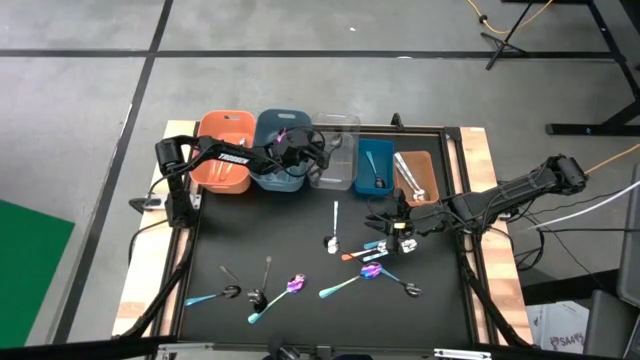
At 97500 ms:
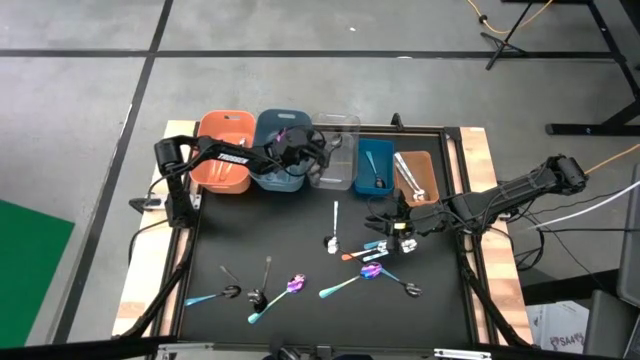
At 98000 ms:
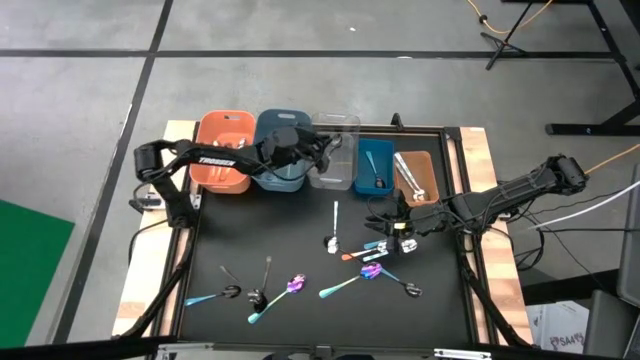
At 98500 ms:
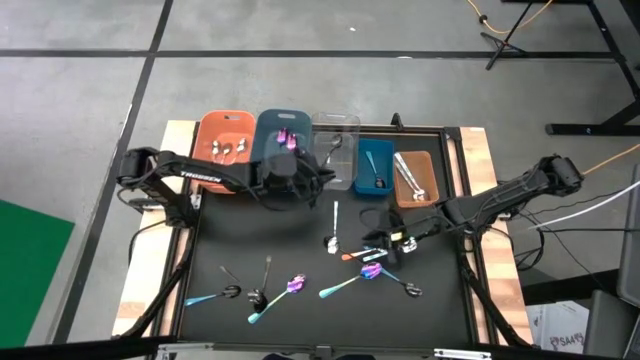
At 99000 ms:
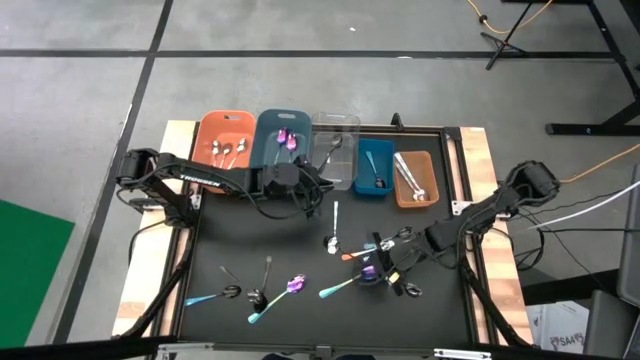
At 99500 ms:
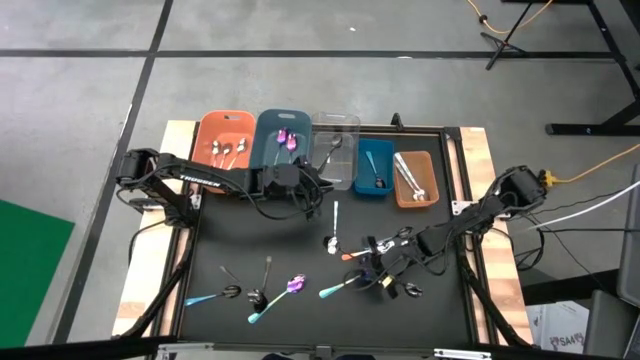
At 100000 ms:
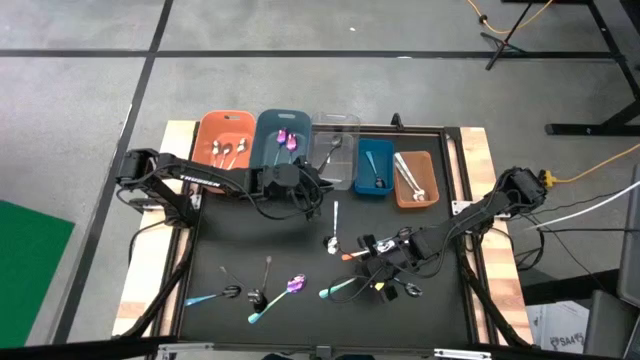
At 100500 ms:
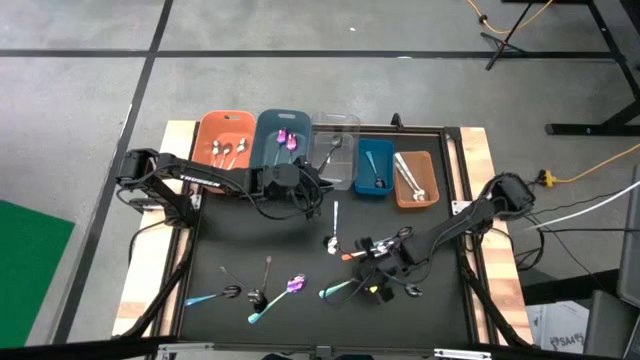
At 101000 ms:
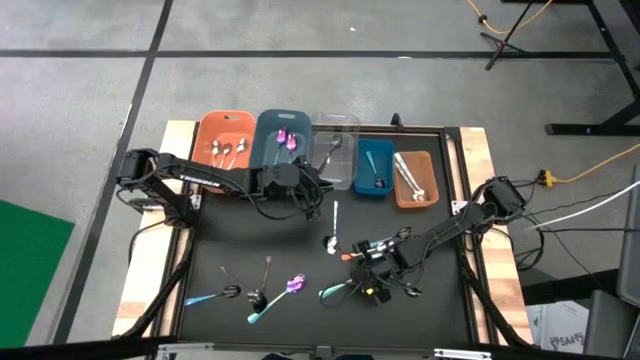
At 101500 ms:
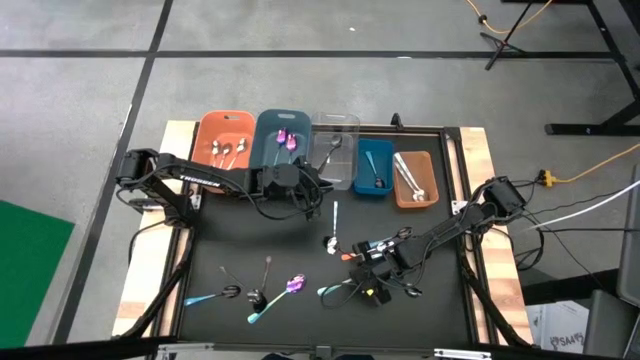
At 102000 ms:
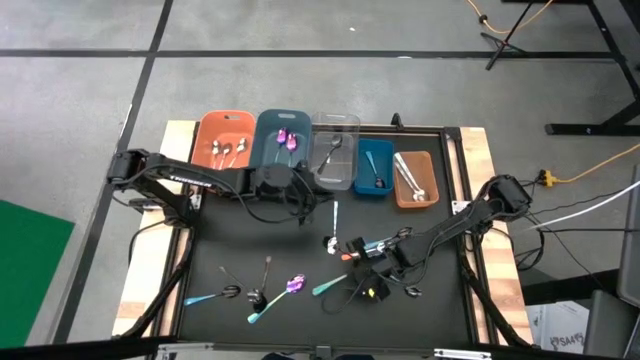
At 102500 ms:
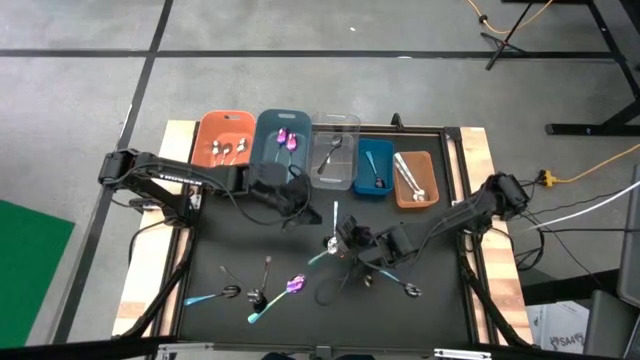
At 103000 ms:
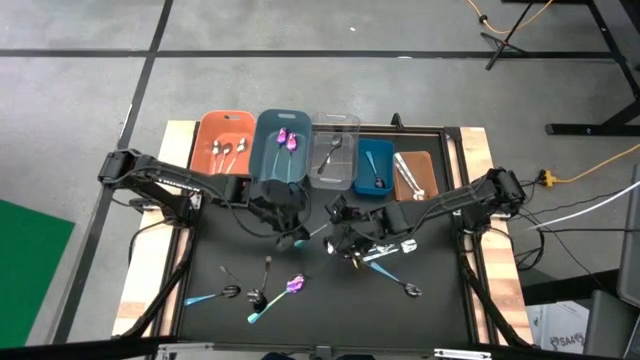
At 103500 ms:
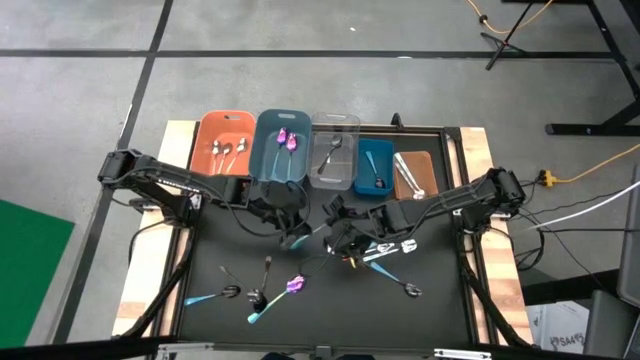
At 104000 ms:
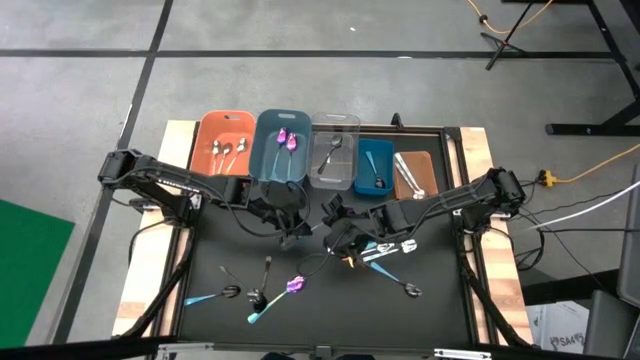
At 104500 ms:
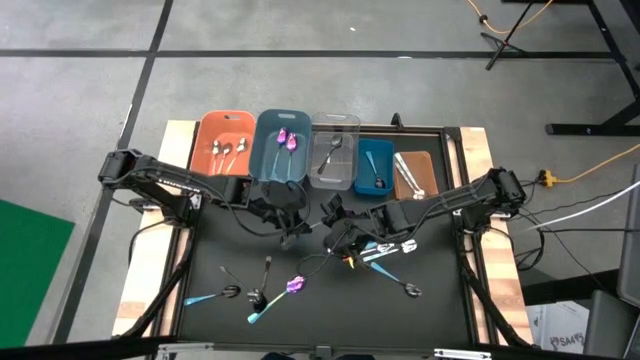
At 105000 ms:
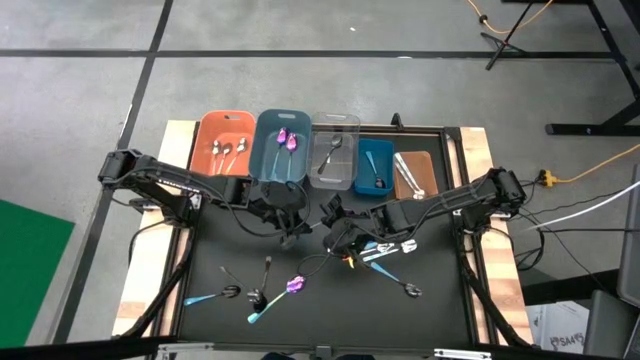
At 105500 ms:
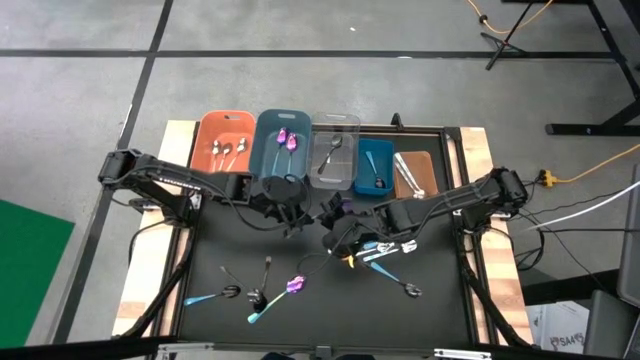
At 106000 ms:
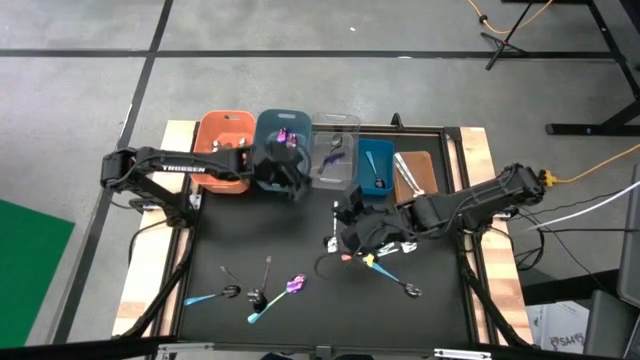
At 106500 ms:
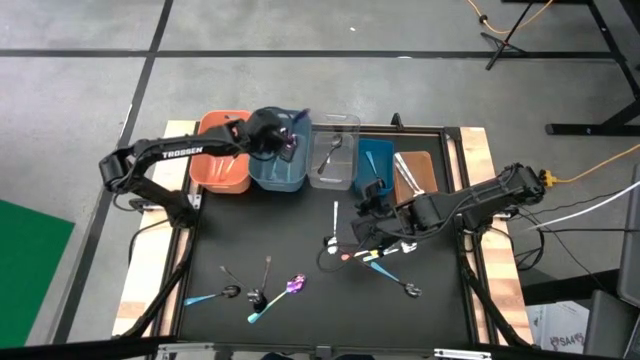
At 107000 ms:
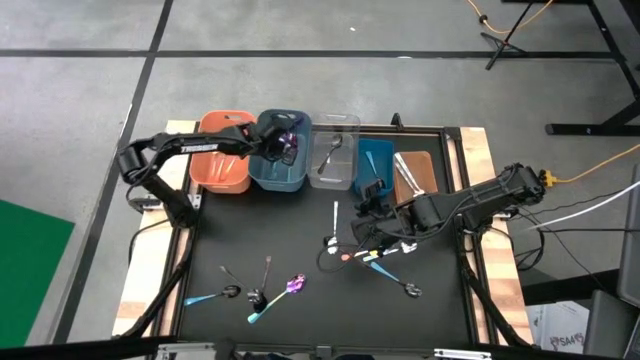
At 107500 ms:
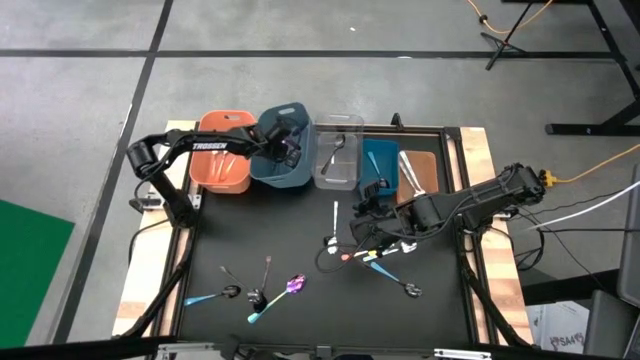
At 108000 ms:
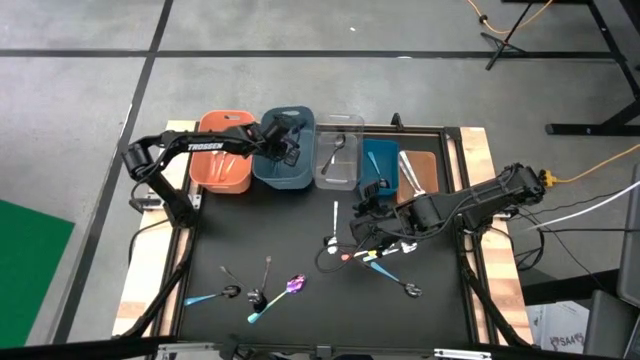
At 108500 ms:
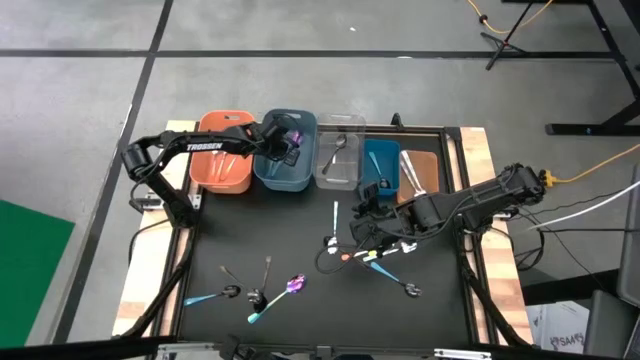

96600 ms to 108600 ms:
Task: Sort silverware by color (type)
Put the purple spoon into the left blue bin

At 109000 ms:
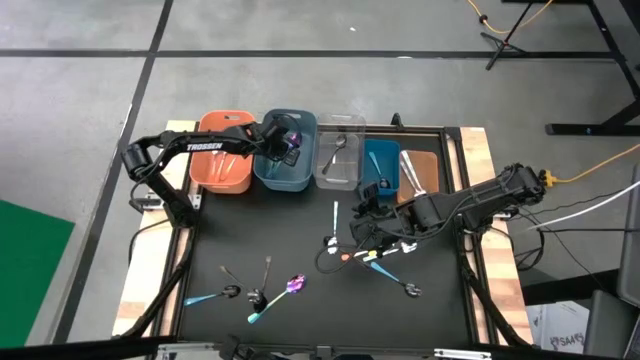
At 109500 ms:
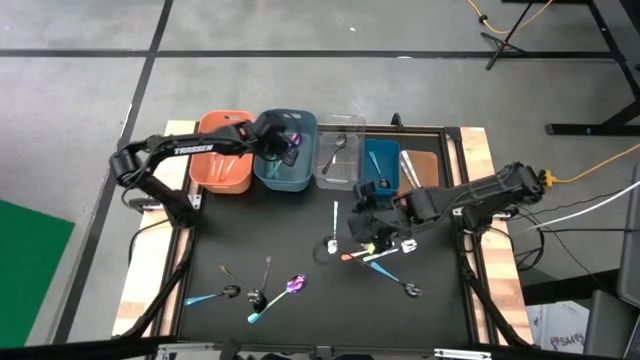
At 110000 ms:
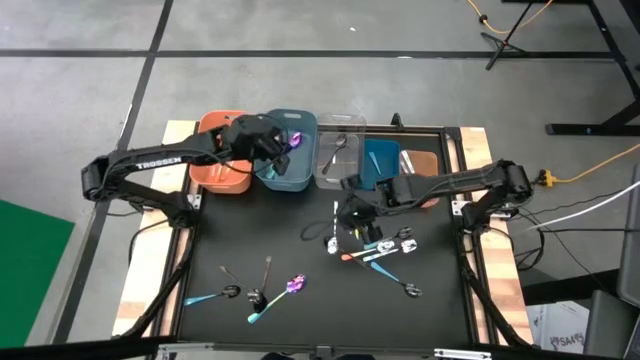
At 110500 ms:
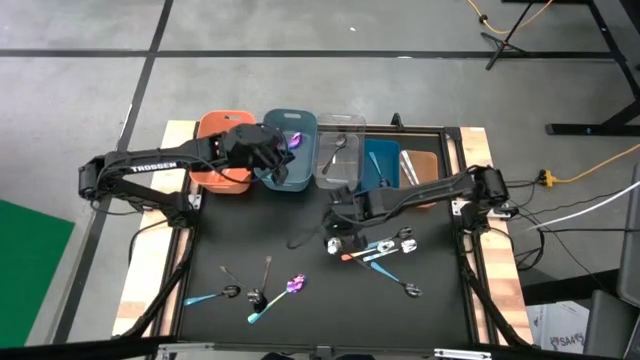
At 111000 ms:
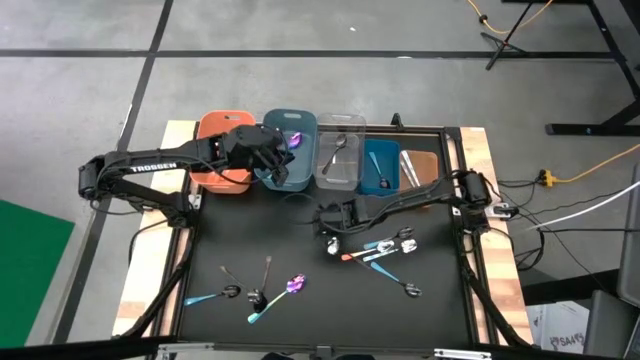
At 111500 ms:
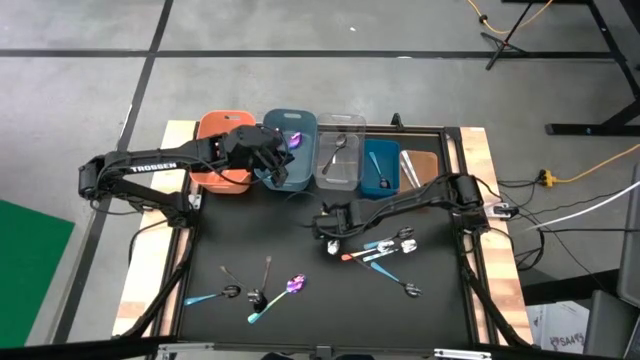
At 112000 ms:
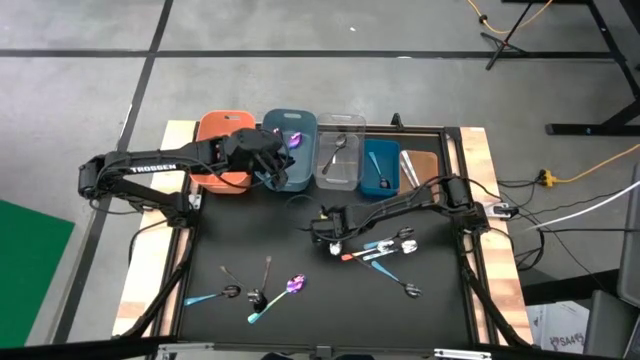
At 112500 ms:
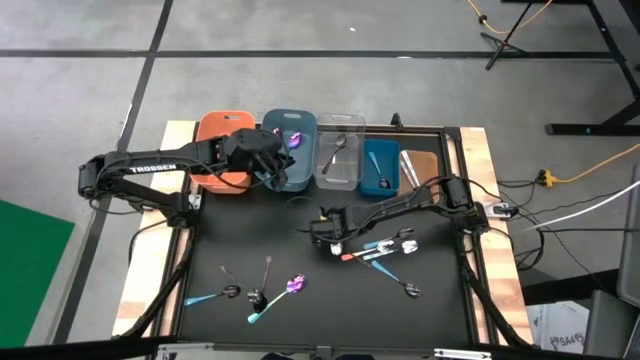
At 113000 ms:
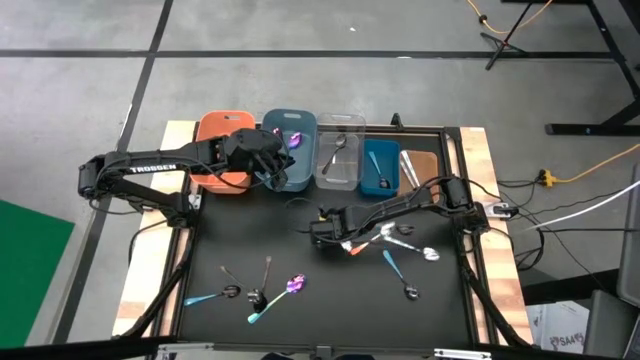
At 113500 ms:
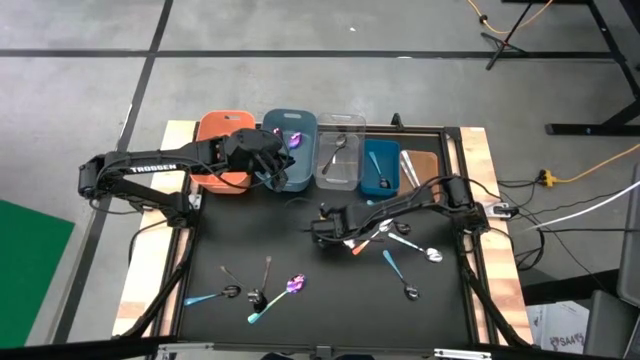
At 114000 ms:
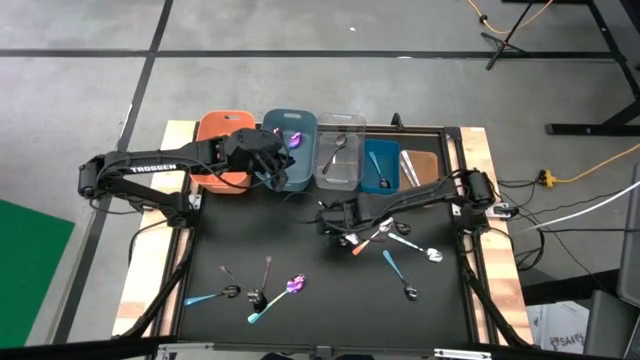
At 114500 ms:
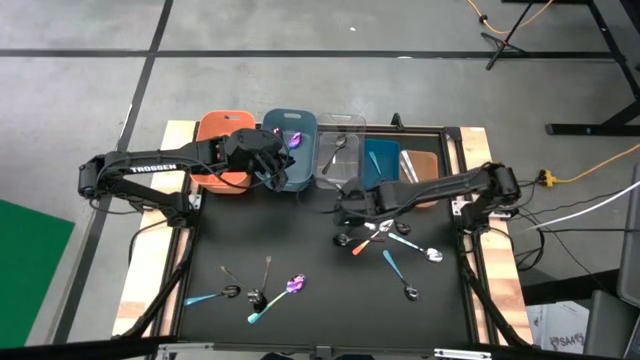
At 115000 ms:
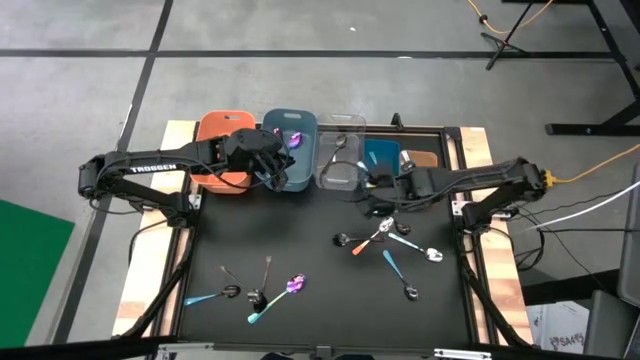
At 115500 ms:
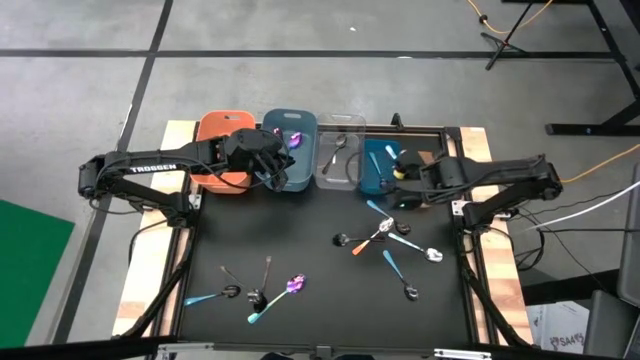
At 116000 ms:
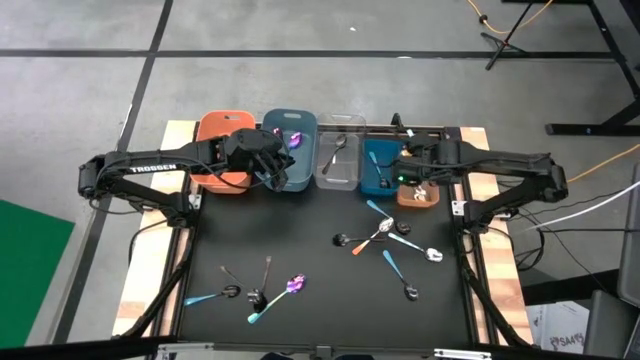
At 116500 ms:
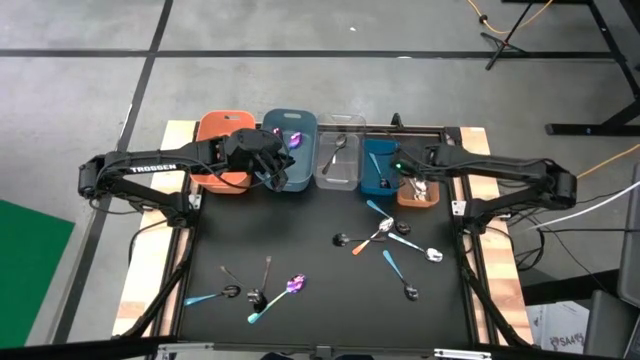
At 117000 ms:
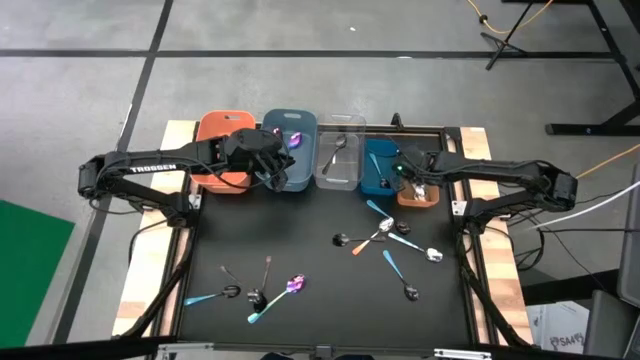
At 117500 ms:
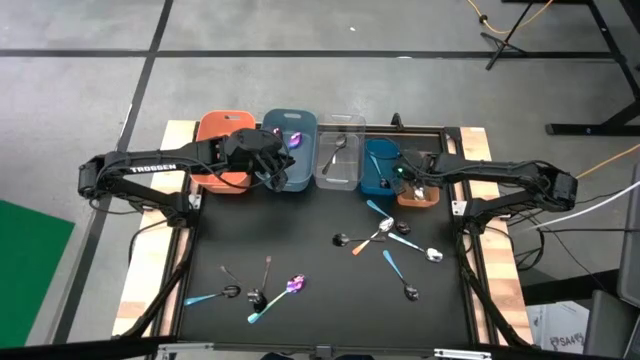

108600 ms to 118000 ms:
Put the white and blue spoon into the right orange bin
